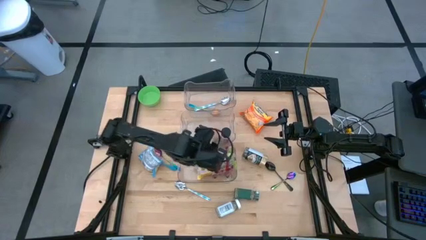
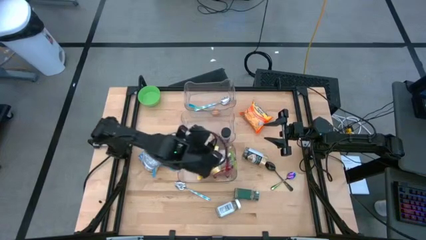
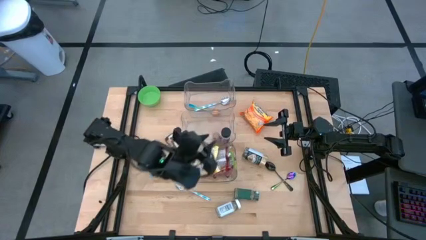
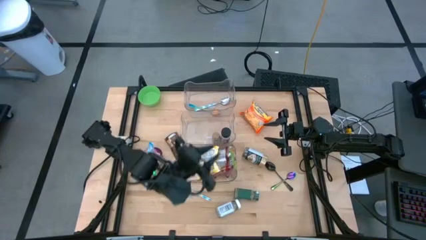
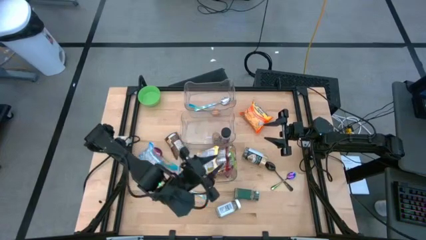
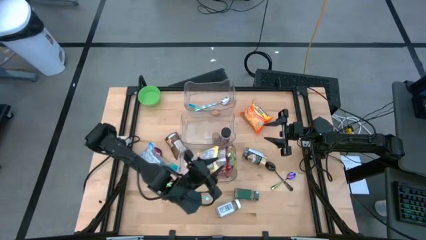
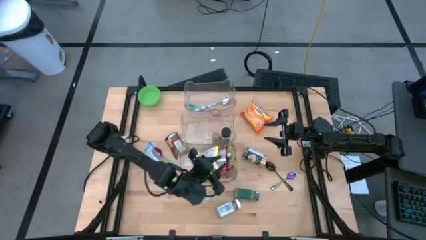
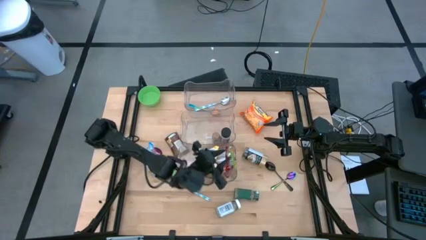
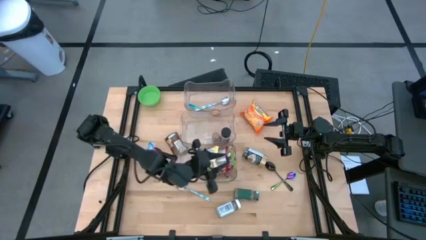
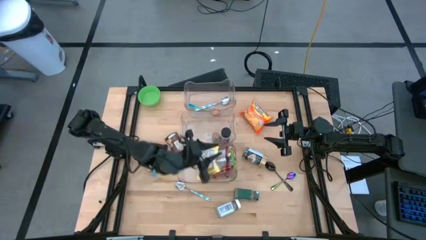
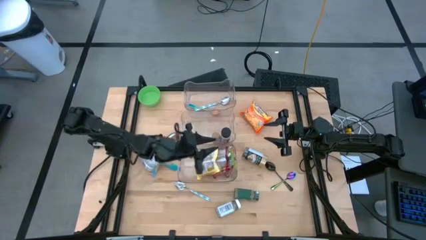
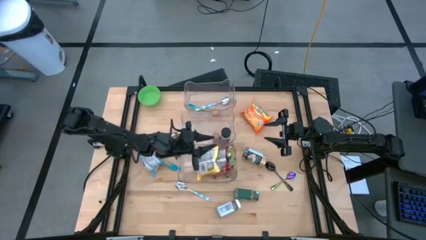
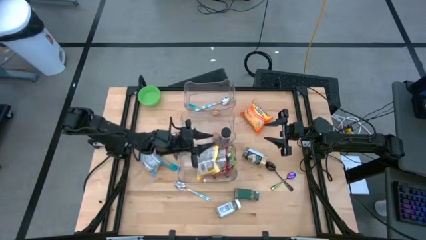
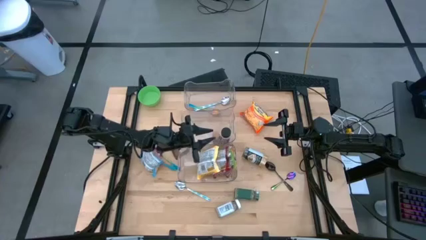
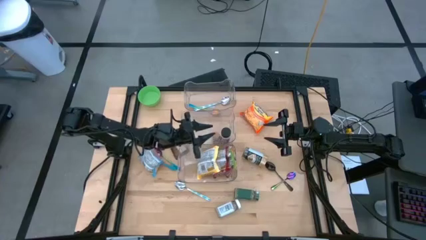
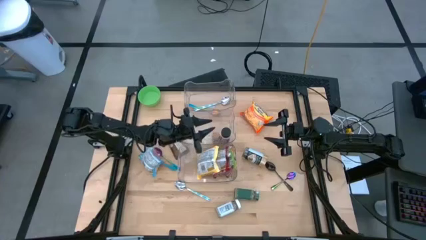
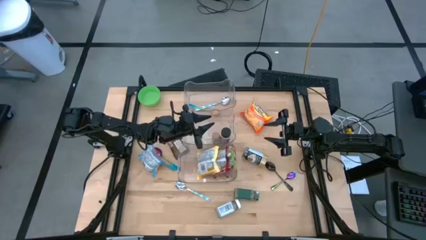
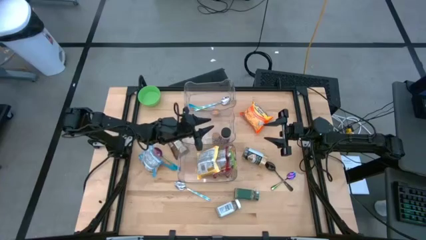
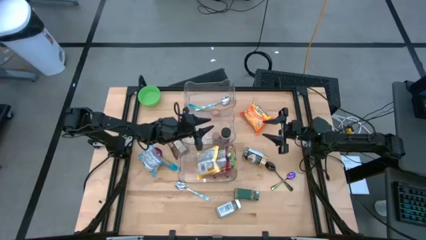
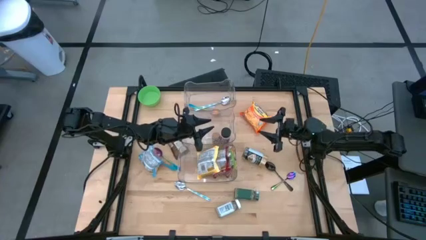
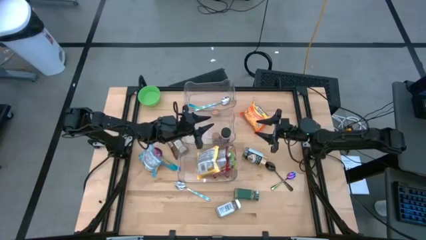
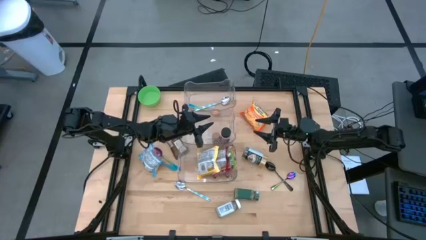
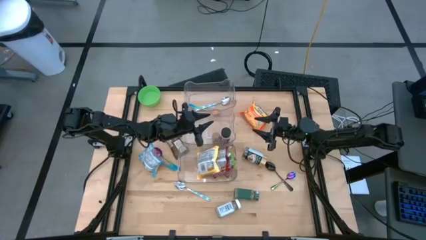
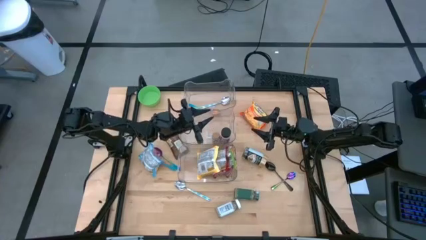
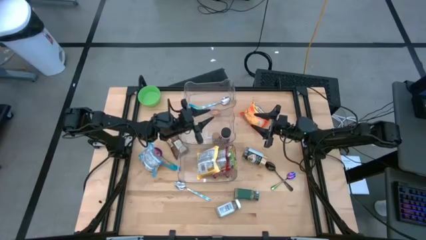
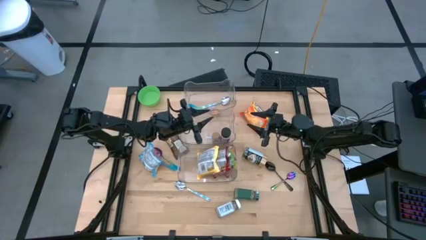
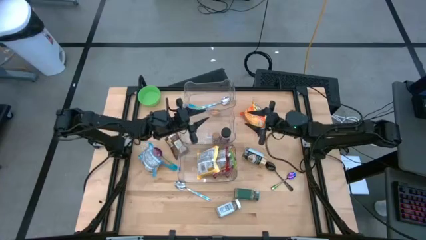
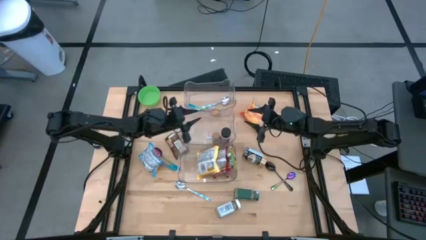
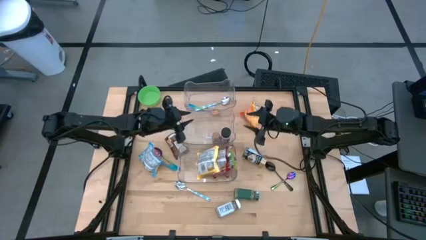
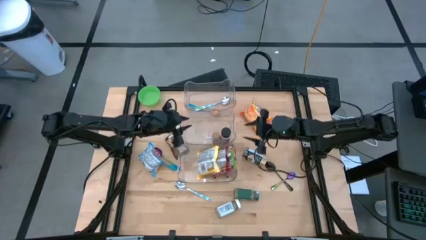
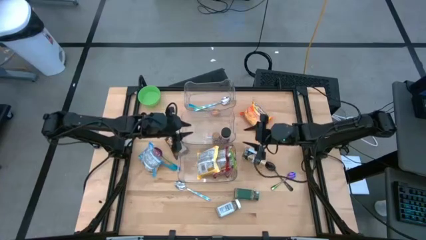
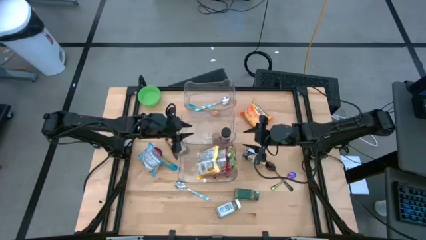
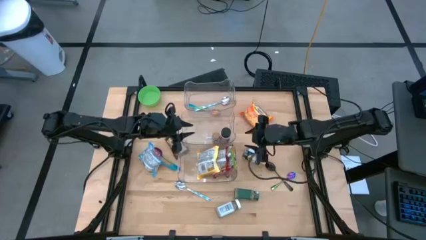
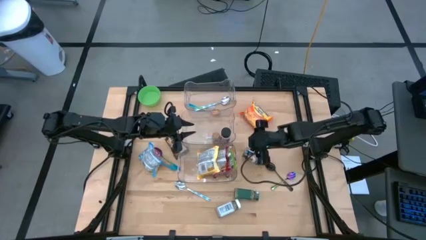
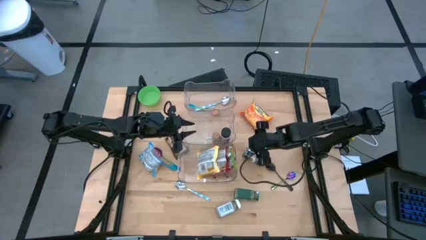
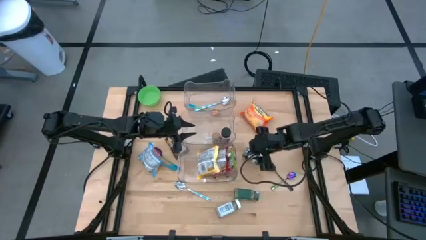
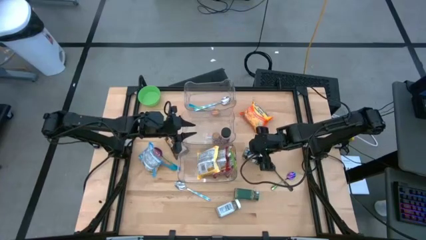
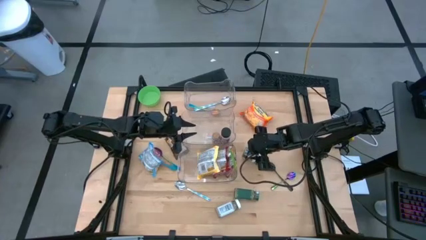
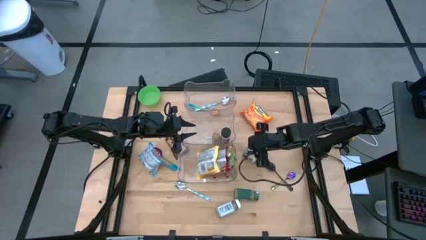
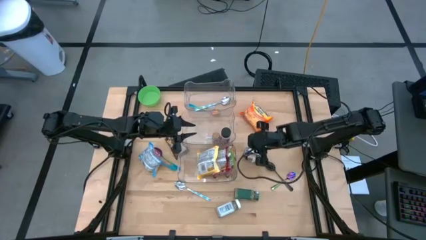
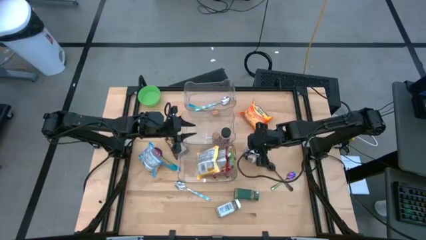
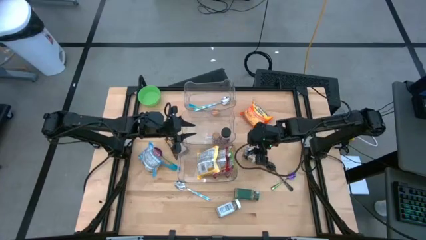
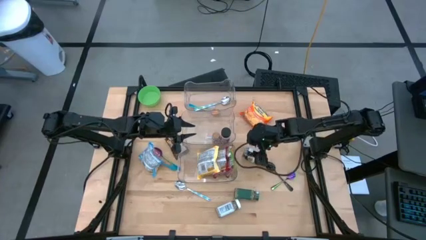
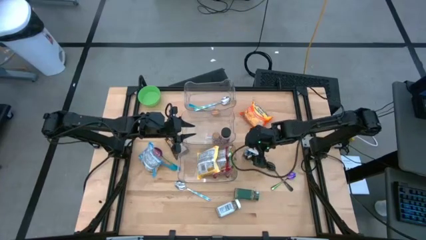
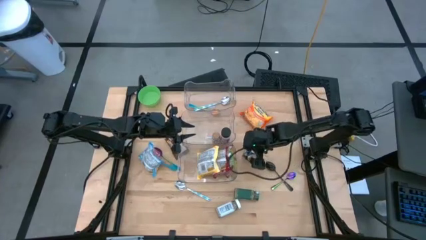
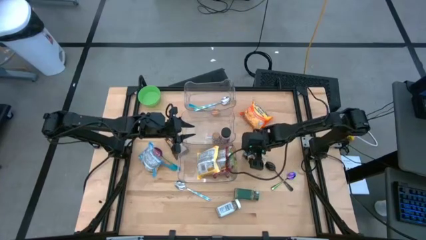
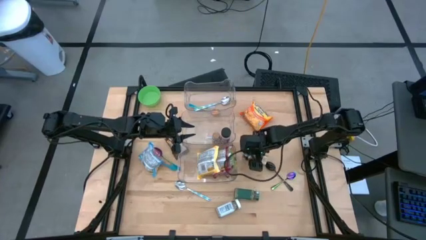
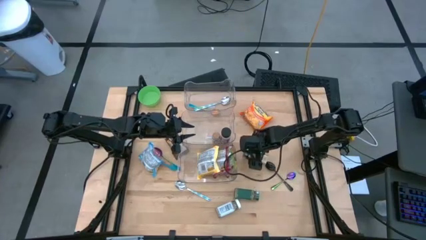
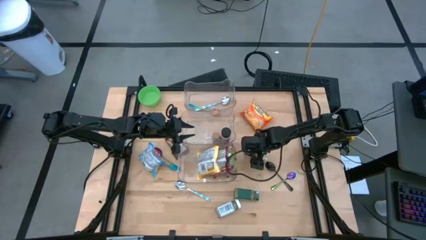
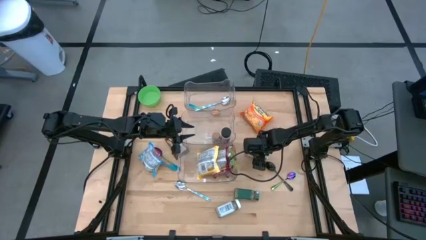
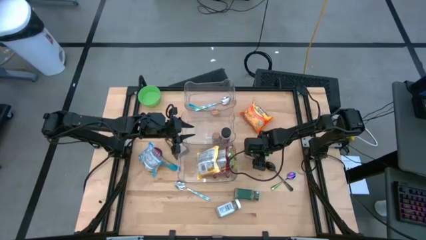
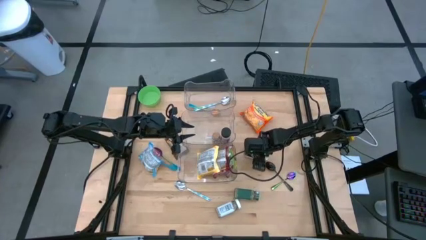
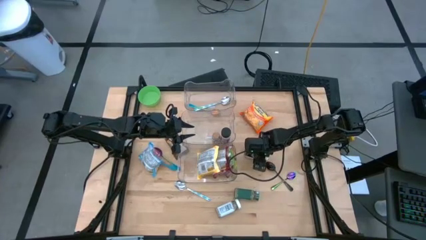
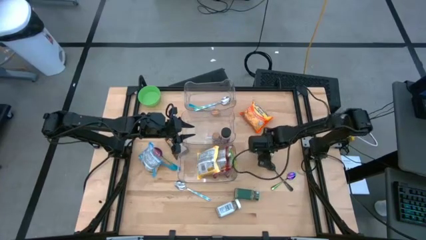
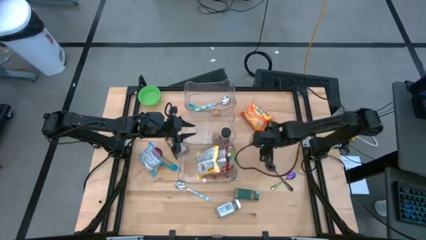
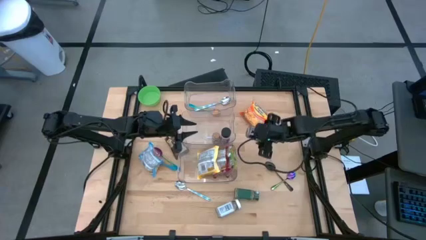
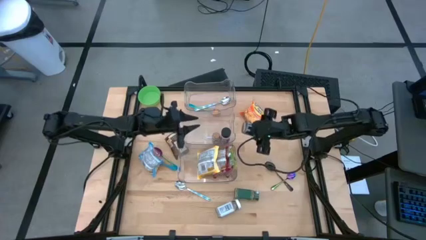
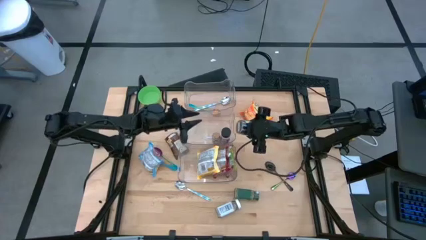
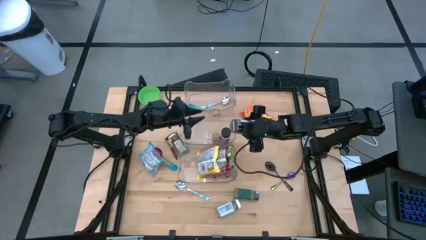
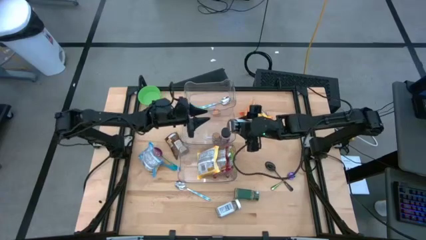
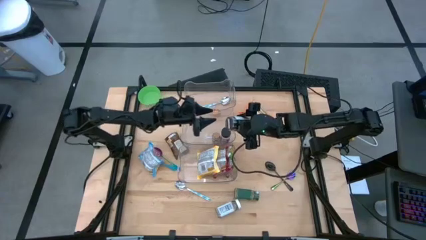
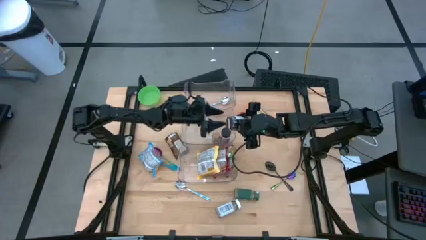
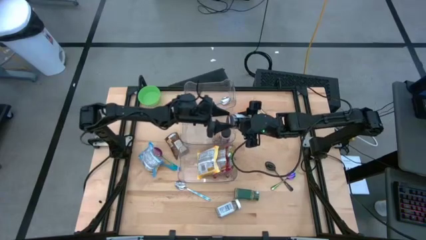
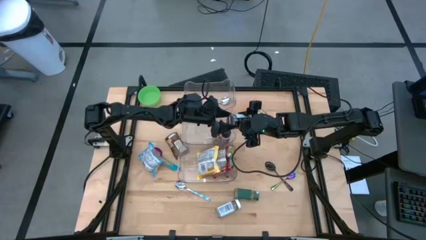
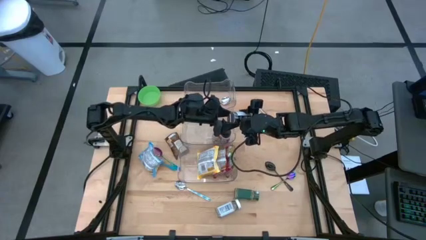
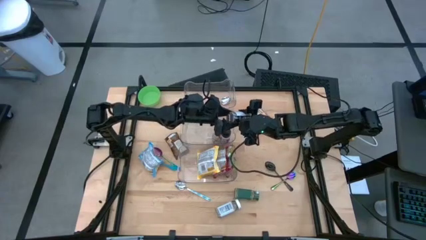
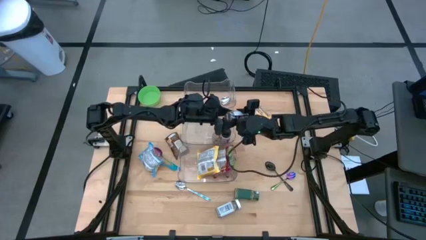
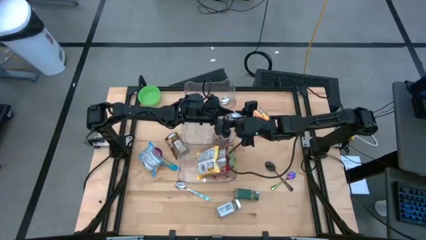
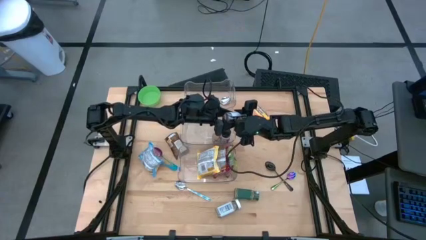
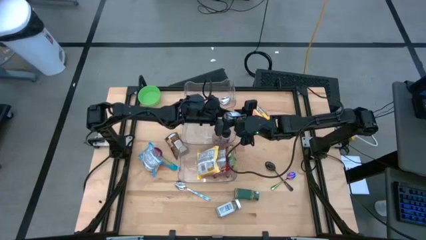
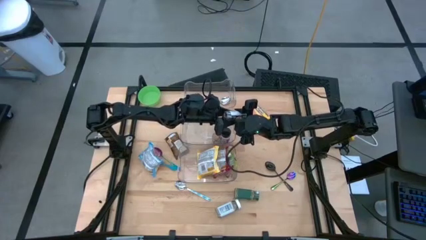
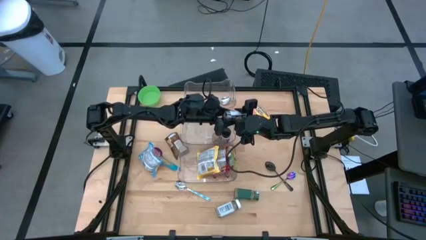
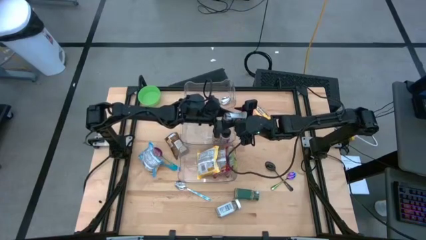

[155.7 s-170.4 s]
Task: Pick & Place Food Item
Put the gold seasoning bottle into the middle transparent bin

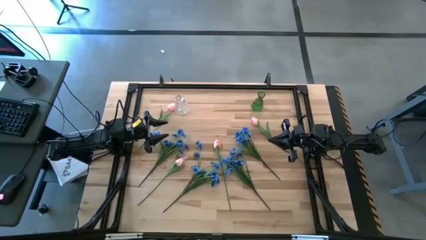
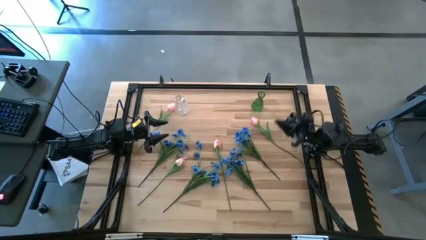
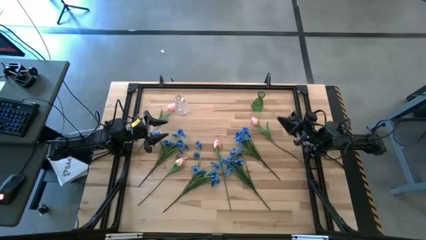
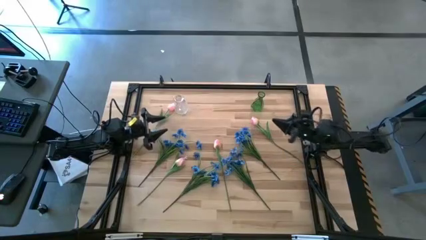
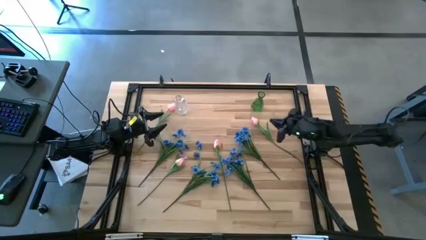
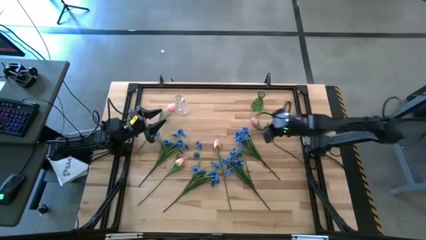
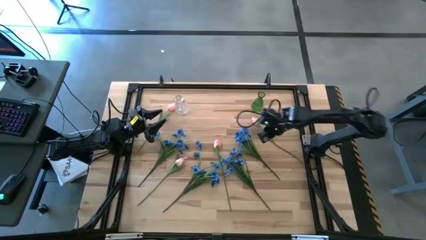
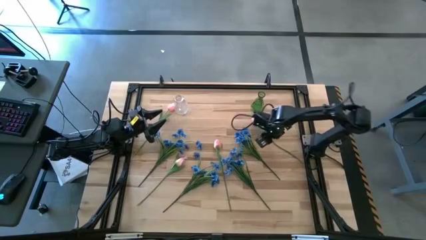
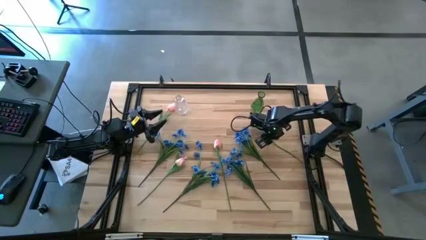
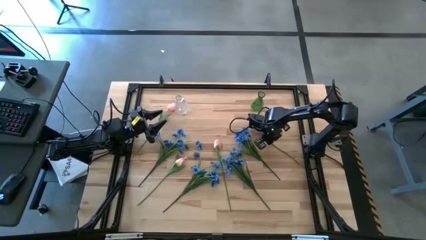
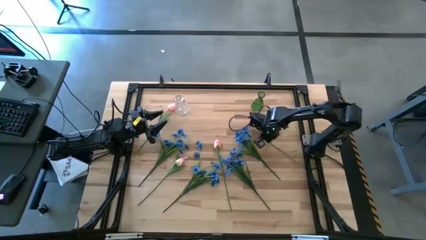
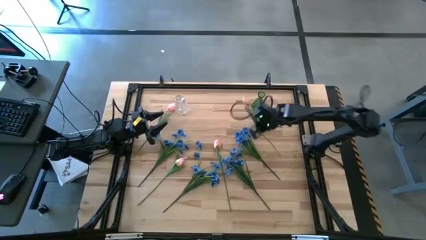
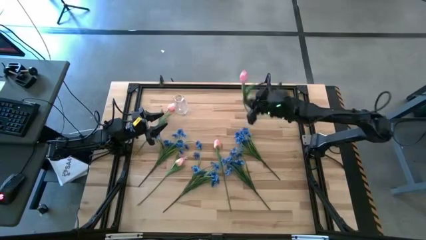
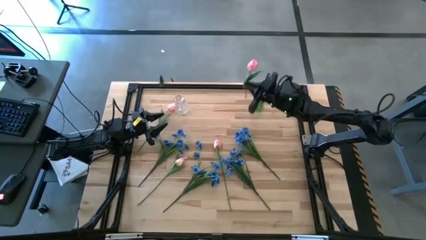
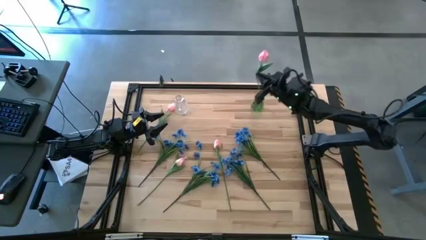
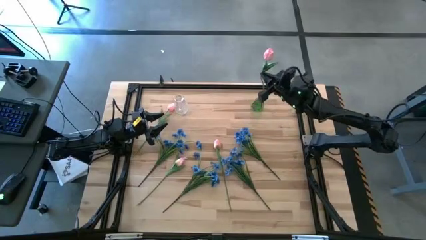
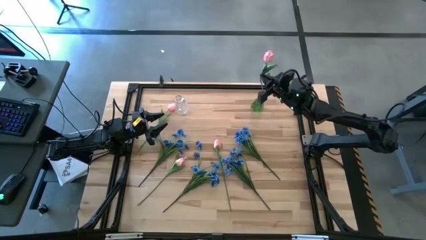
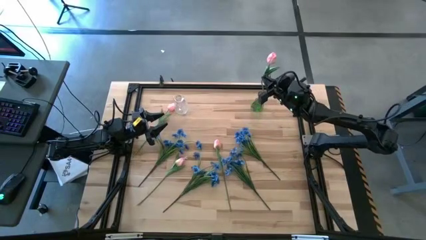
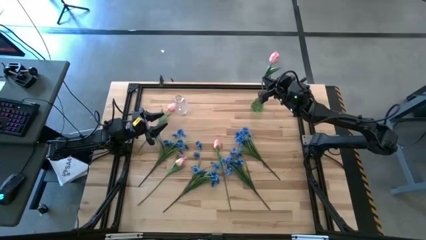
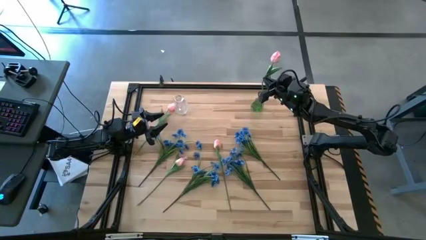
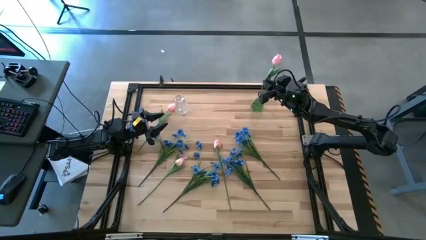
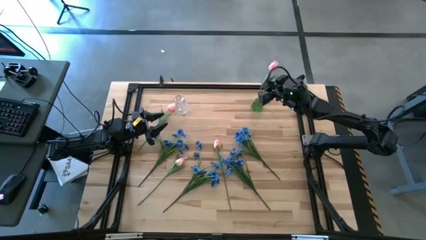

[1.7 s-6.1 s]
Task: Sort flowers into vase by color
Put the pink flower into the green vase
